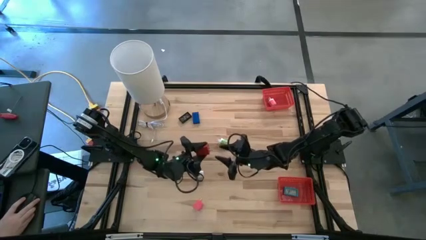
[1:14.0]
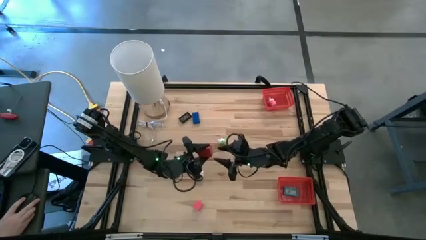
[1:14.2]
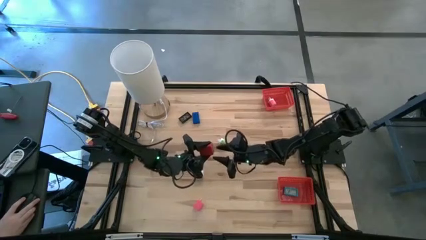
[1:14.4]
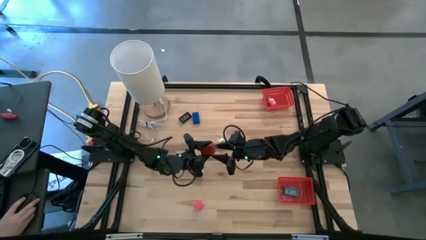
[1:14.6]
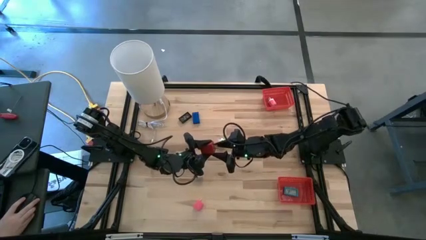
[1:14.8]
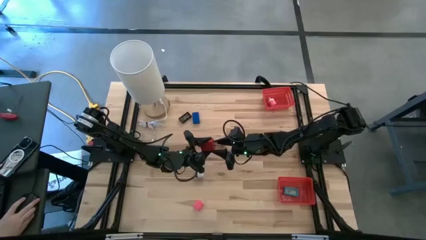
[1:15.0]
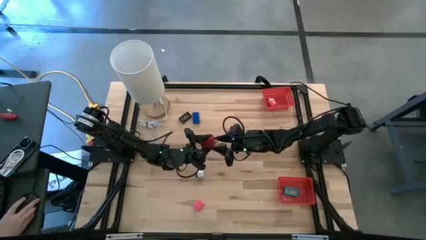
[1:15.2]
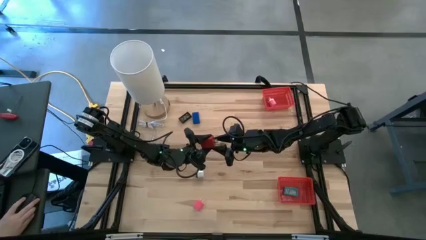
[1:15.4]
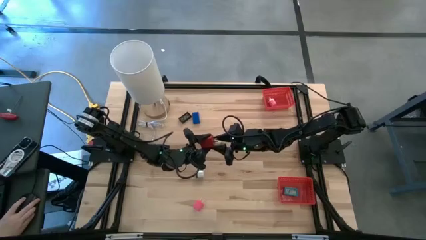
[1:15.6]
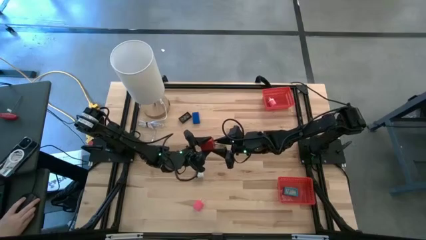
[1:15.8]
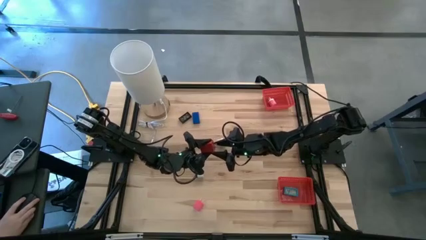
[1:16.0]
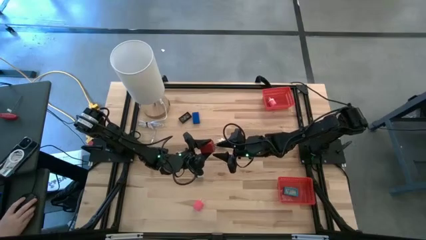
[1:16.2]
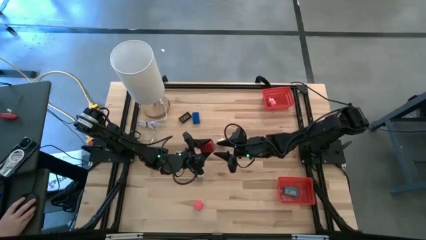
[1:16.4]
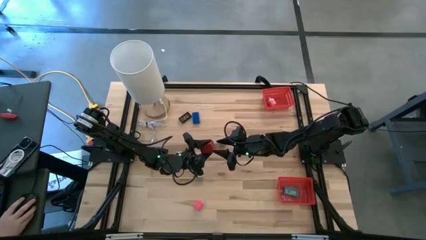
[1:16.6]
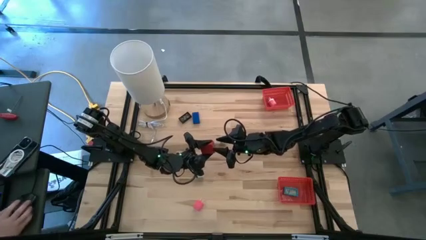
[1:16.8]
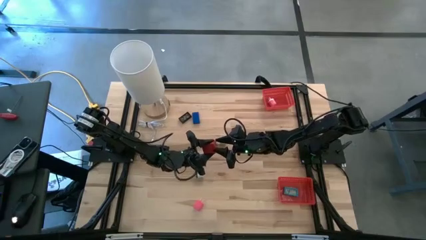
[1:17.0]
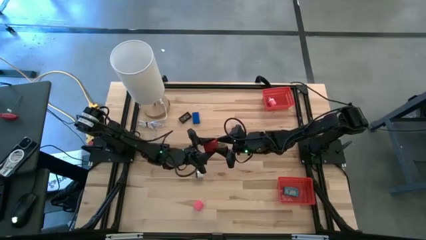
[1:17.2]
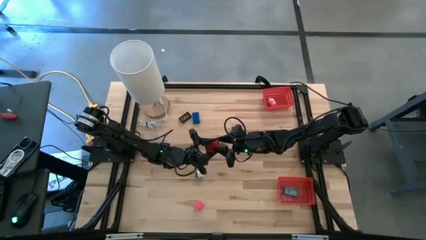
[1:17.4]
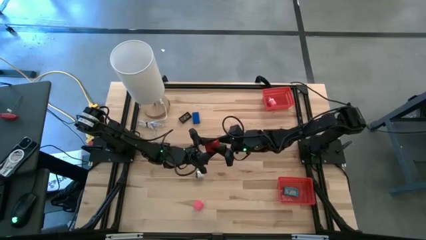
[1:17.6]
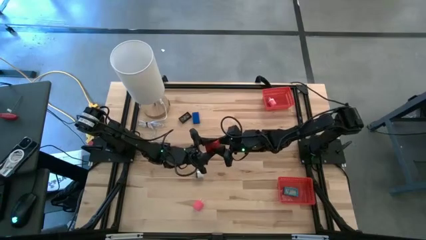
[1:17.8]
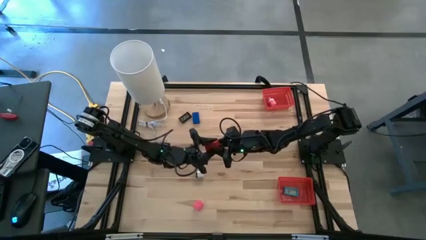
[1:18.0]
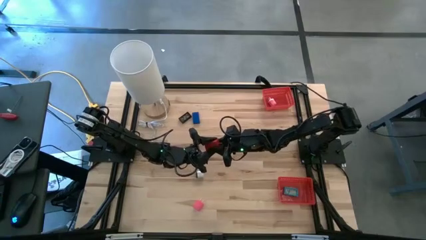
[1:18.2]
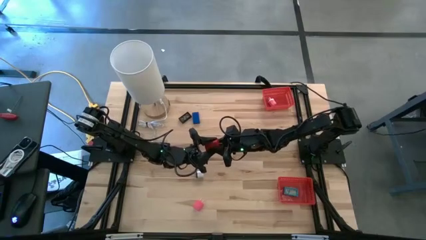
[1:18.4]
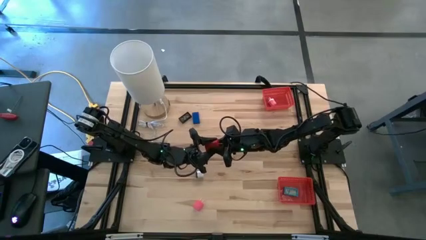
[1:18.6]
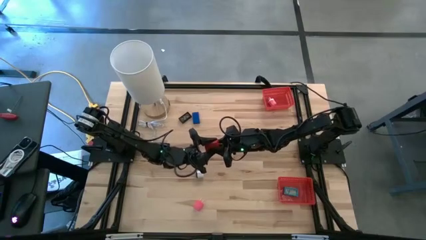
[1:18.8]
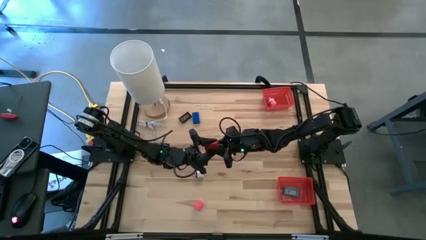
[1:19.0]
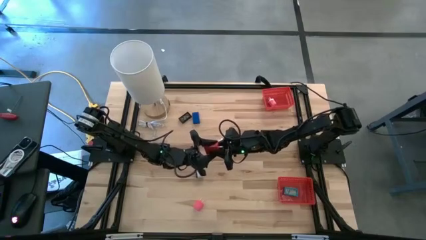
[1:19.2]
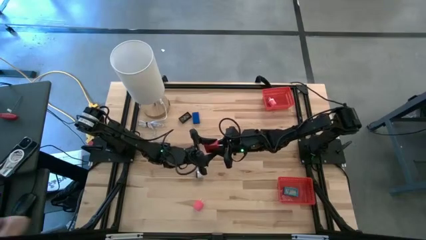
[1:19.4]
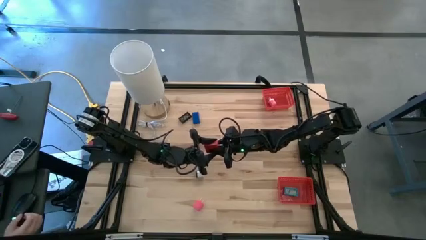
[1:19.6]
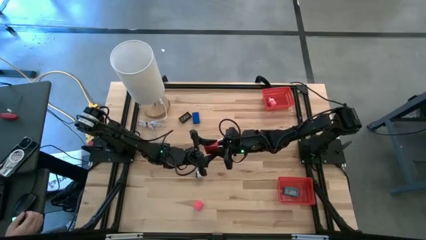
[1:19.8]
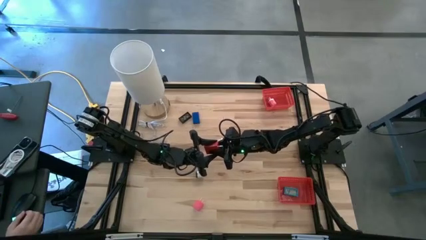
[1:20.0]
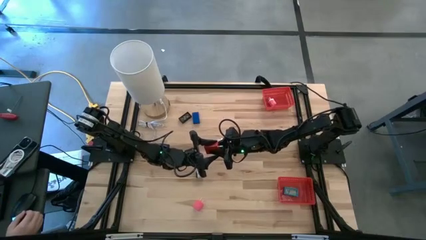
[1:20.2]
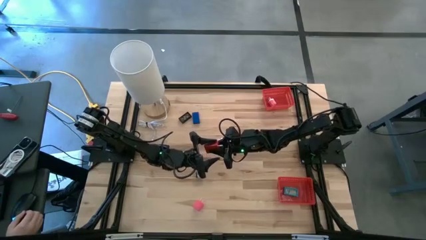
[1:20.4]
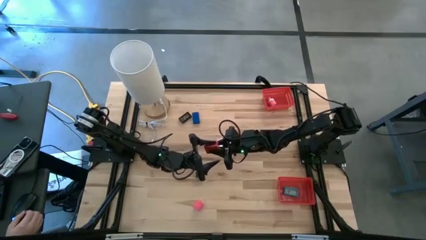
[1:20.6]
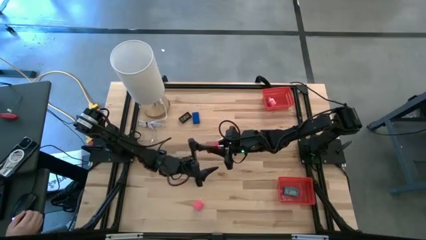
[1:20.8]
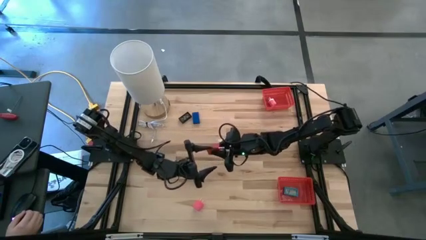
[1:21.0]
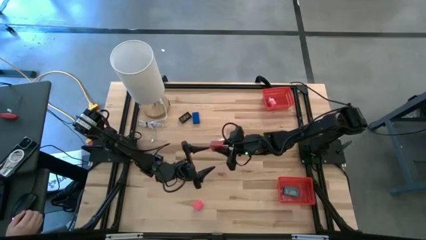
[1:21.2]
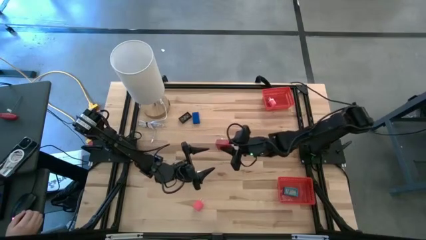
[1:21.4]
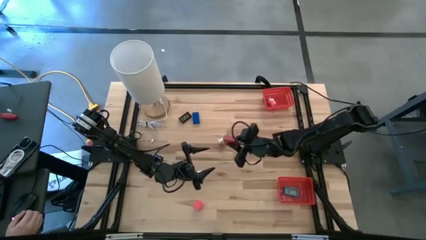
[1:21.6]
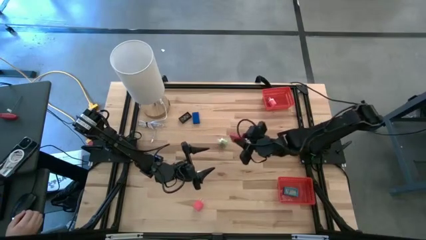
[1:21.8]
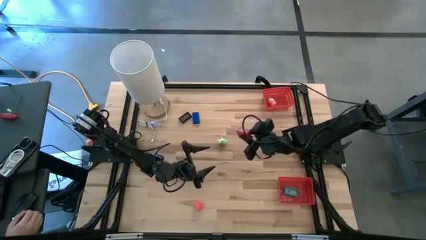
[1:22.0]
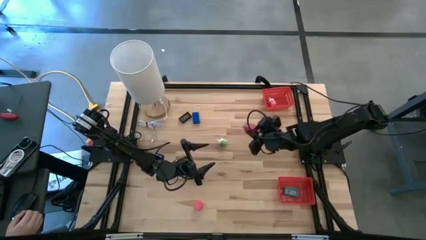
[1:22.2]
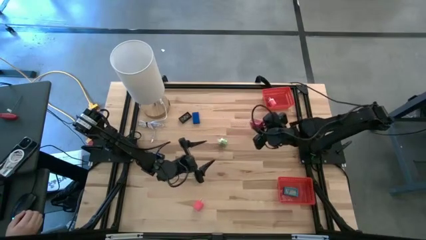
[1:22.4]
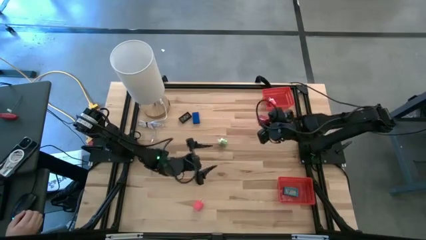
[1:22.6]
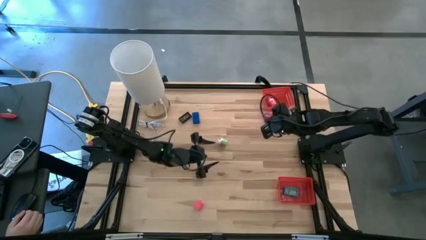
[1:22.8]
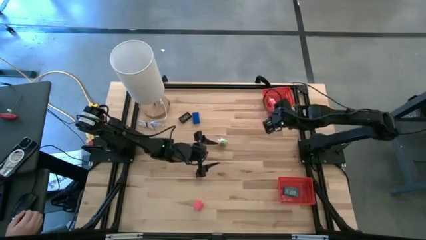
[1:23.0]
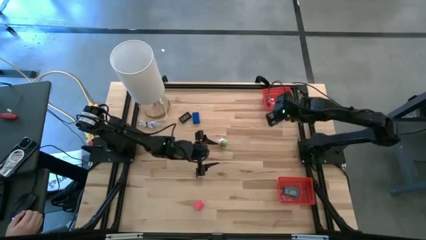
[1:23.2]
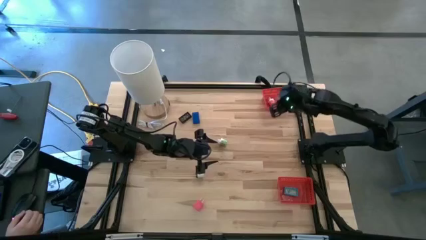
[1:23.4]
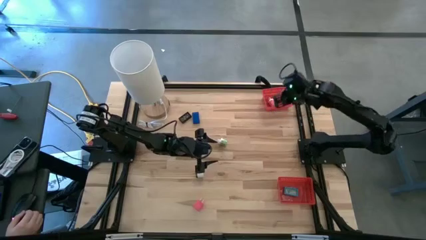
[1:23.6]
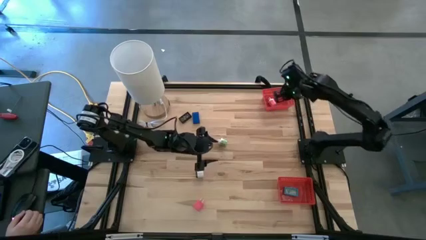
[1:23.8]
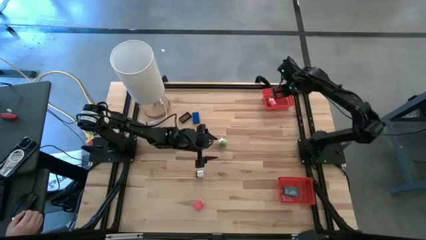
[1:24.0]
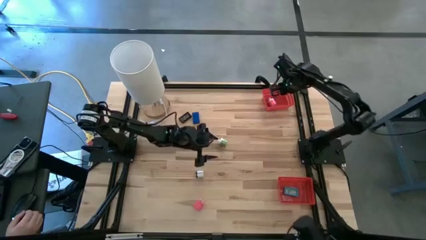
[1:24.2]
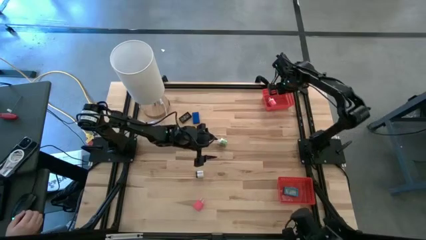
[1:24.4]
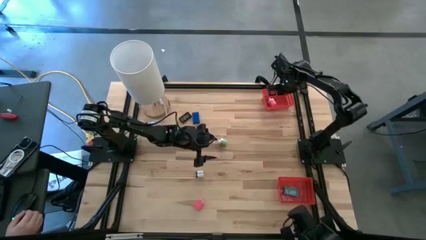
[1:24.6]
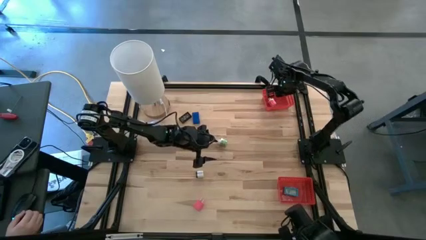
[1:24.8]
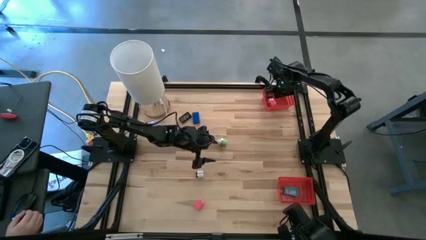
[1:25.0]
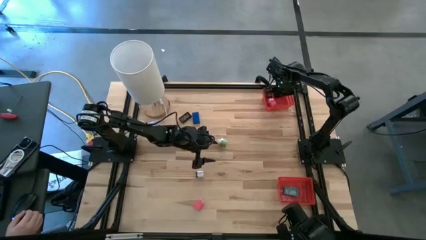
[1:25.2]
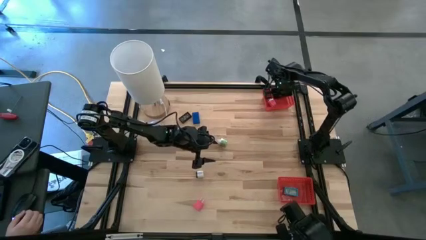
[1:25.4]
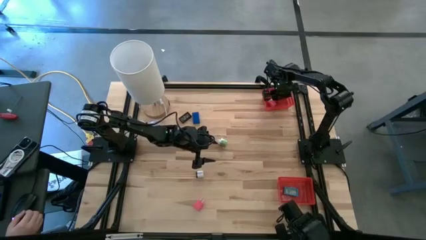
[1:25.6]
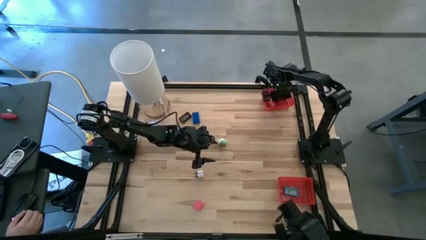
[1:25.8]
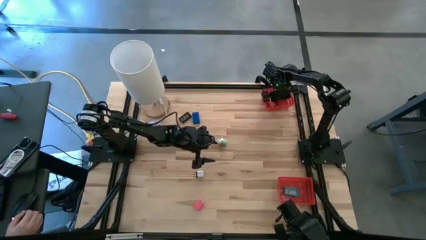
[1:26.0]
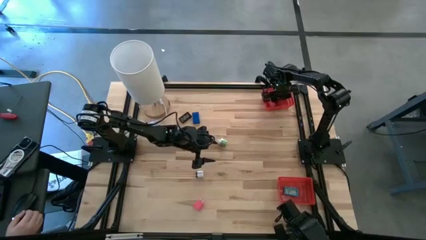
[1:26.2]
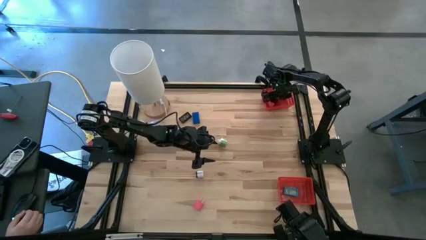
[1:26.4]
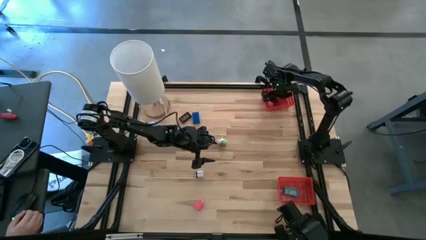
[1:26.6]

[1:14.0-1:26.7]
Task: Pick & Place Office items
Put the red charger adapter into the top red basket
